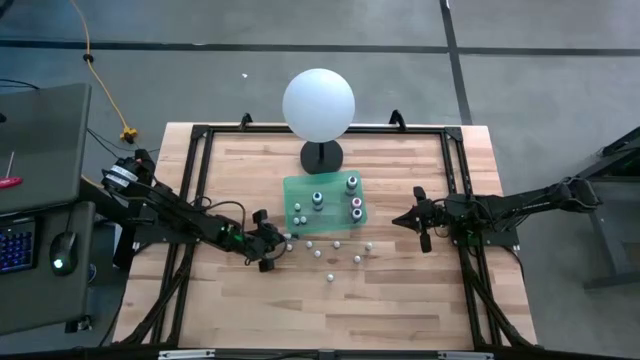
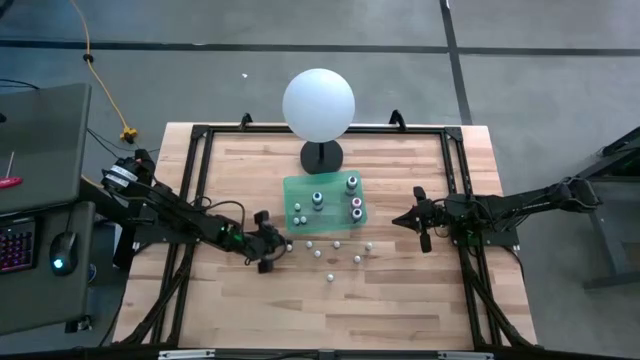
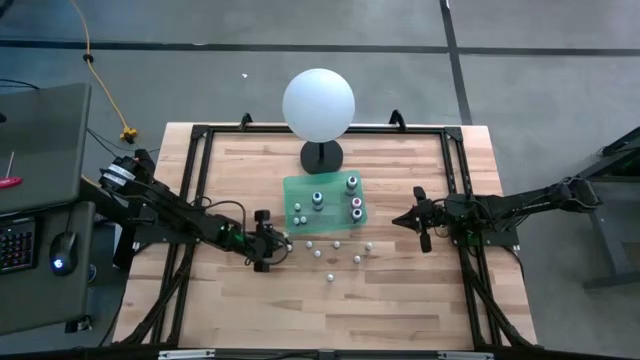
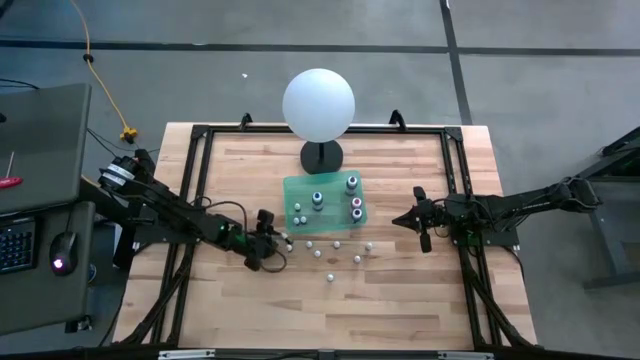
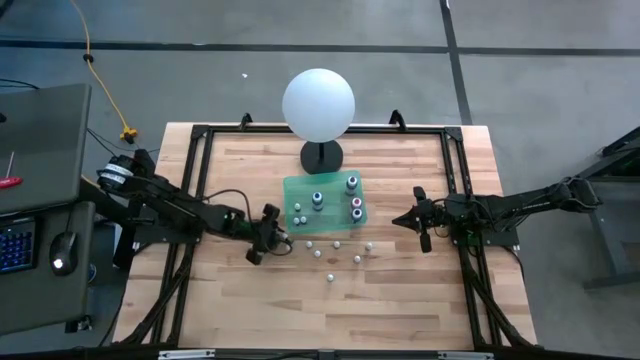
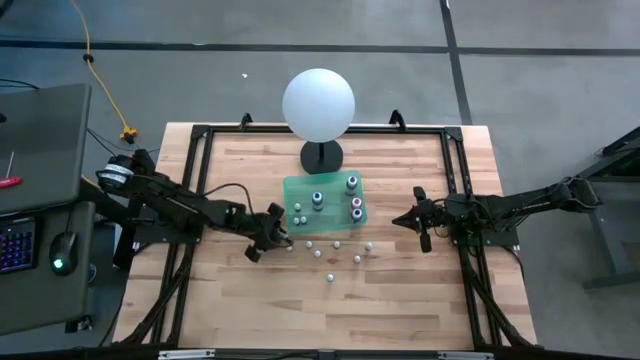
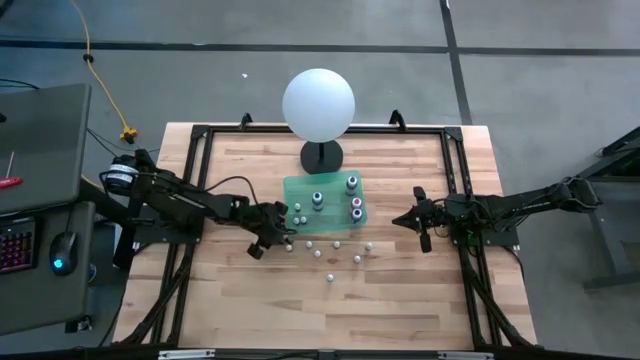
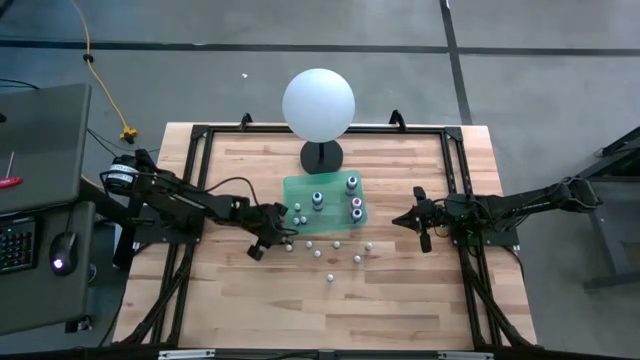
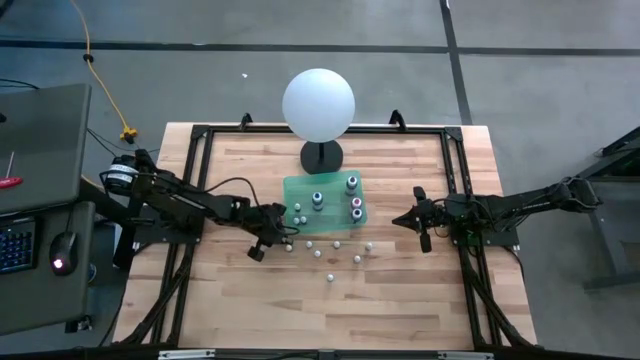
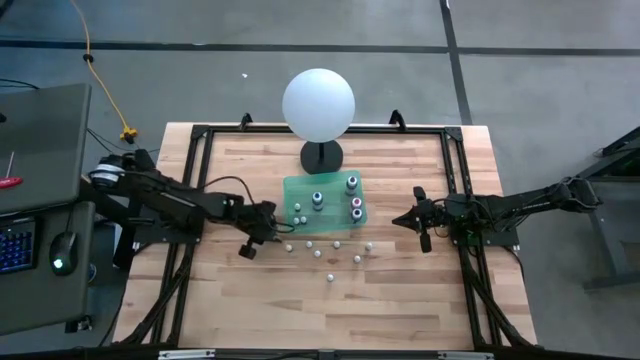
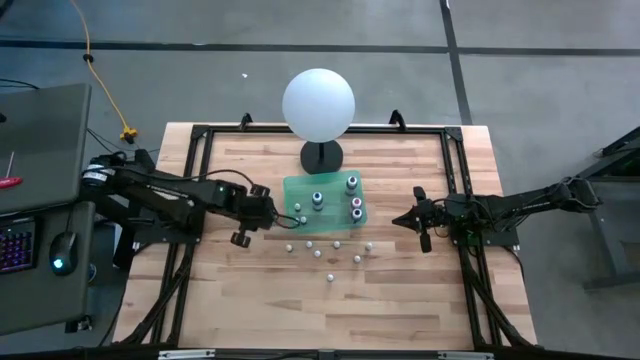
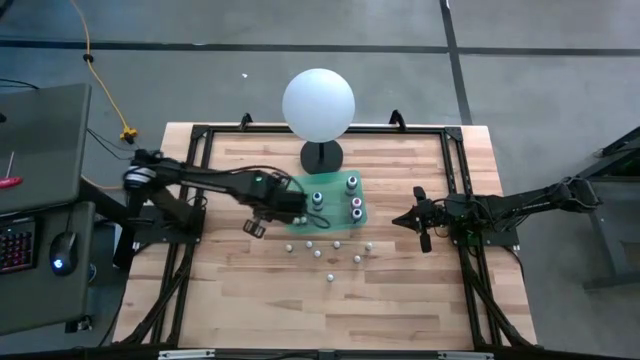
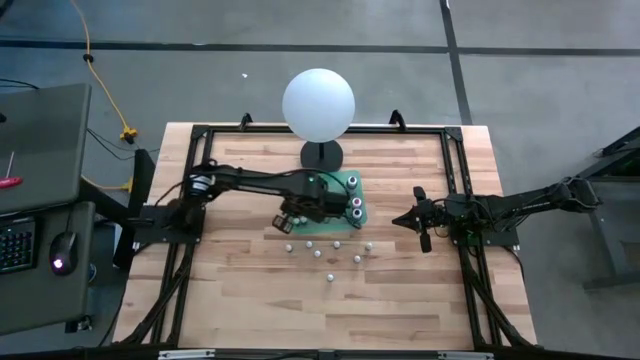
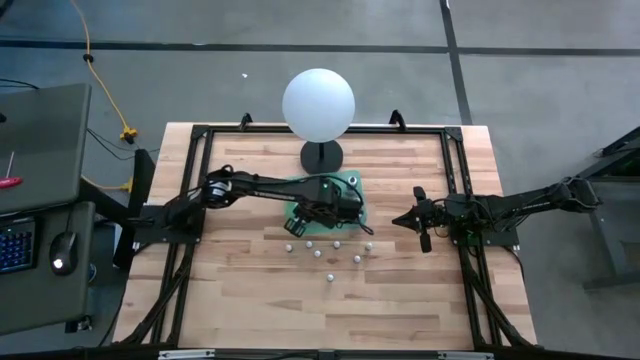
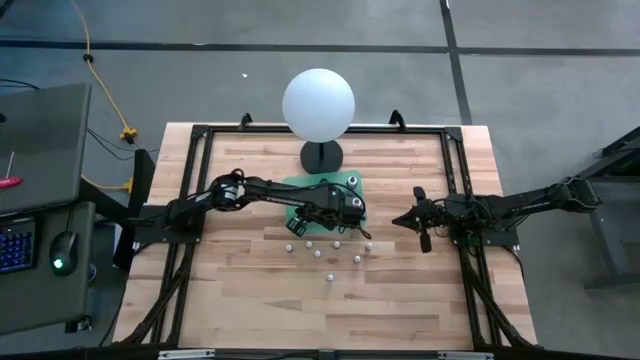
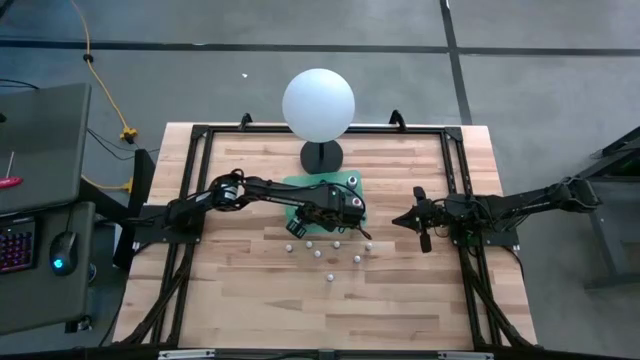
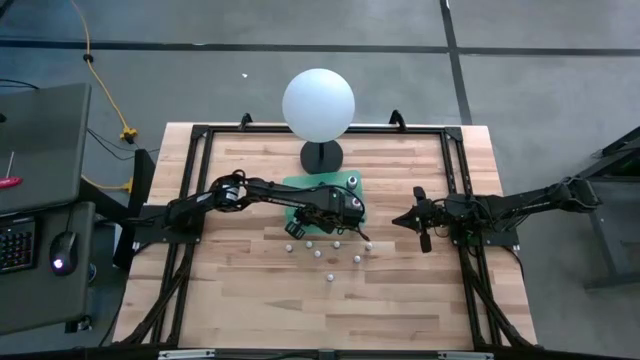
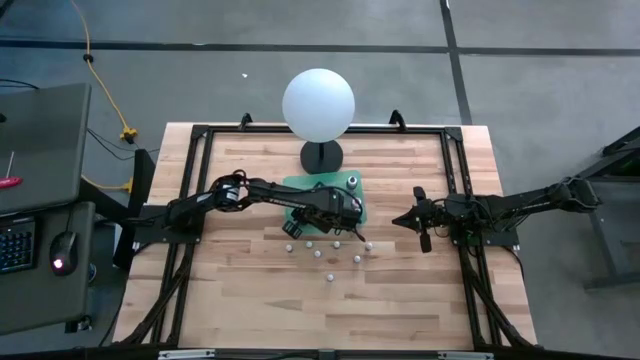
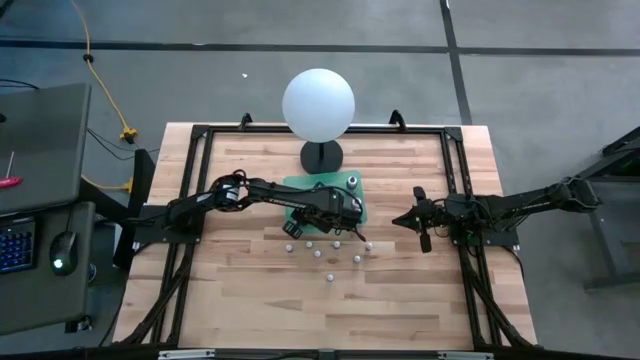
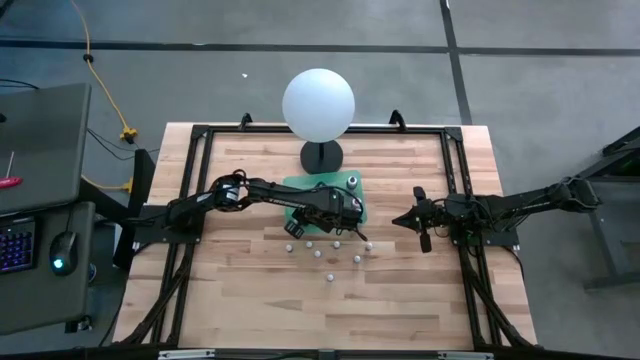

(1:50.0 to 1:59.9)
Task: Pick & Place food coloring
Put the small green food coloring bottle into the bin

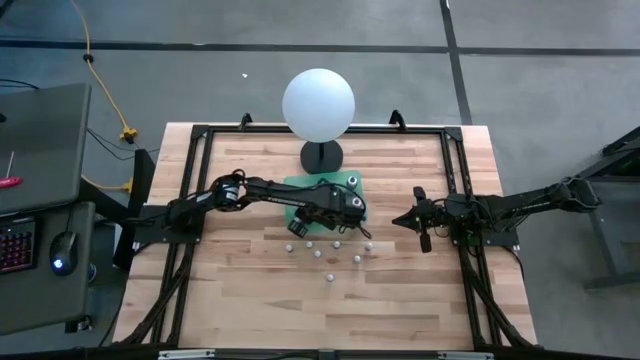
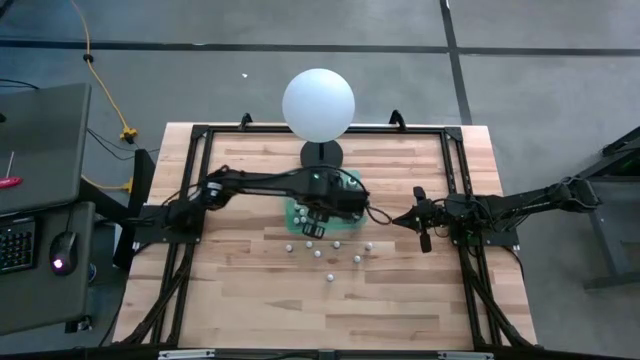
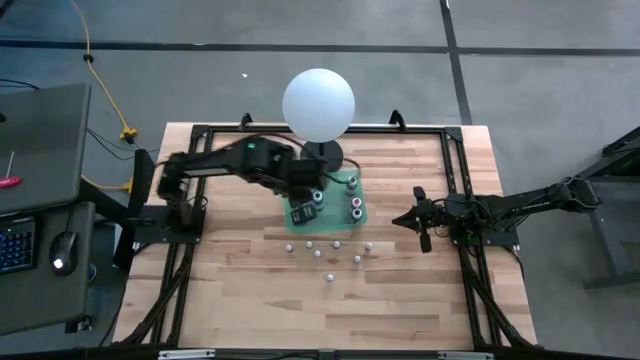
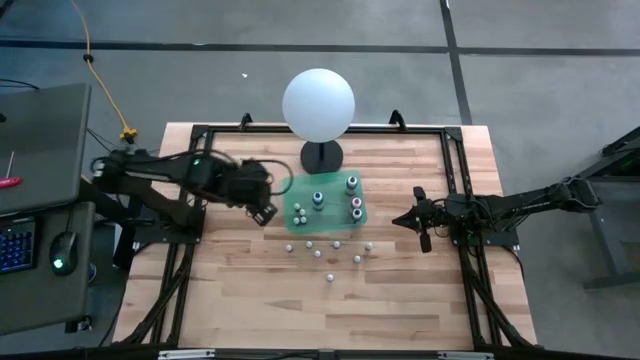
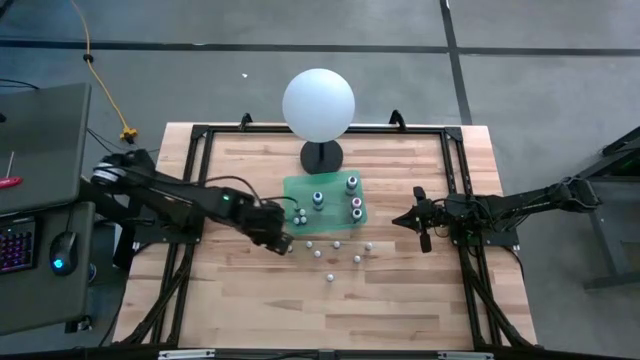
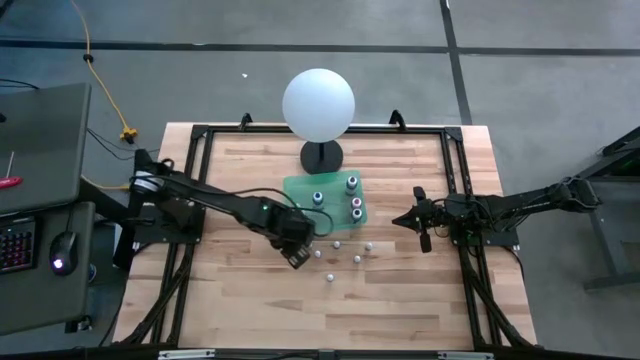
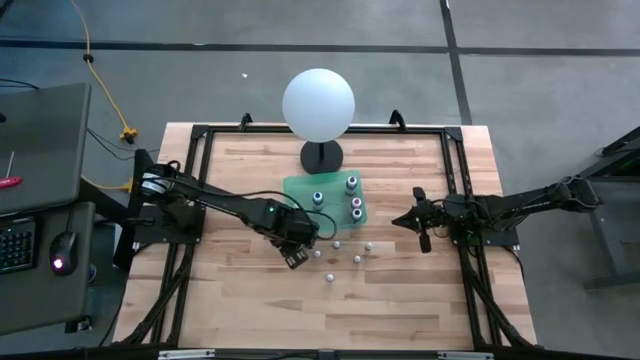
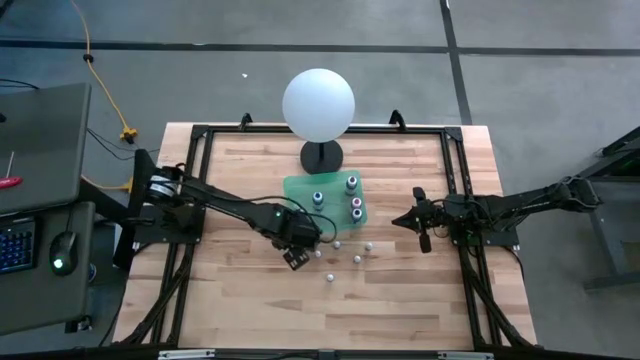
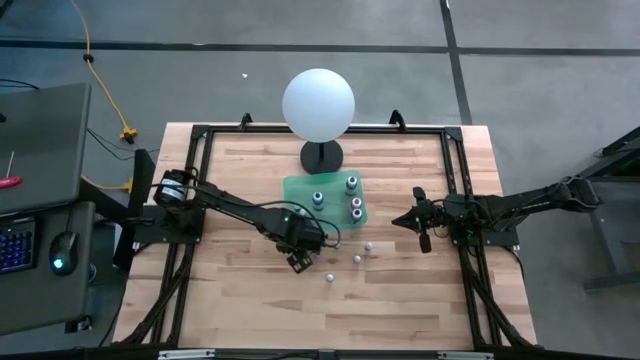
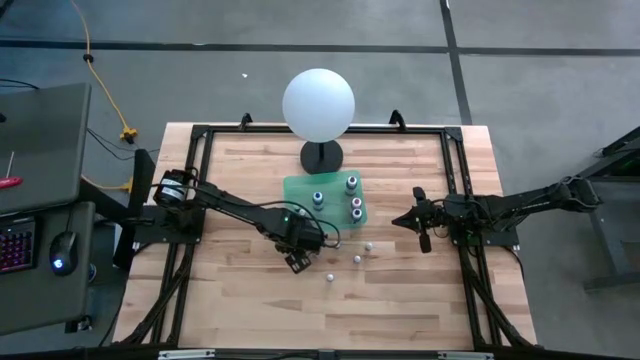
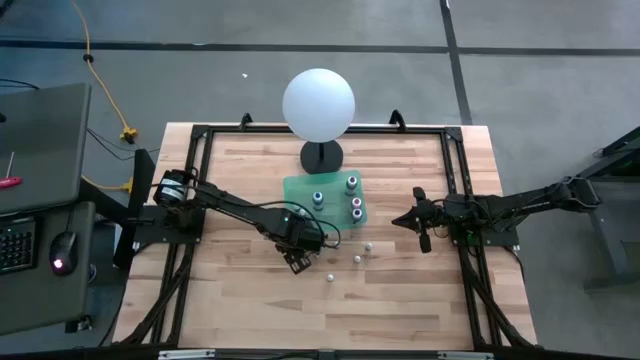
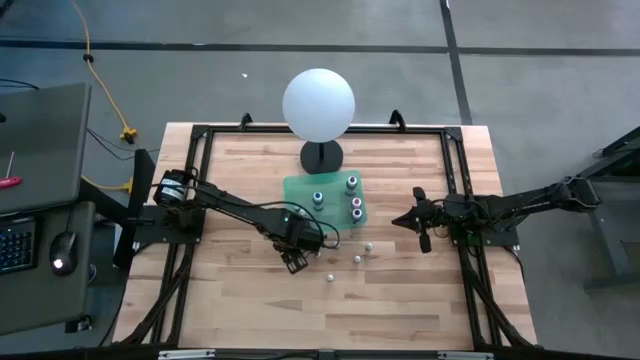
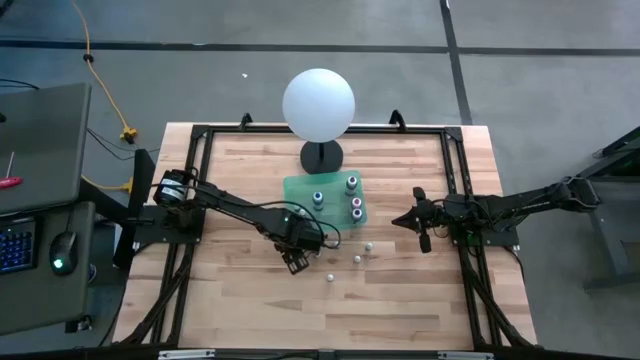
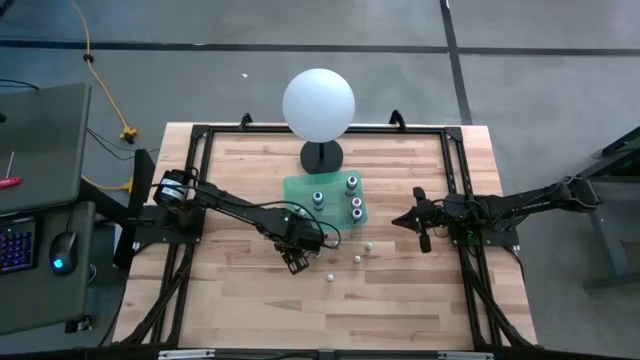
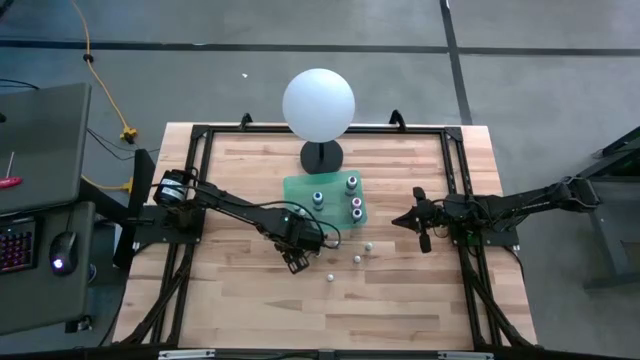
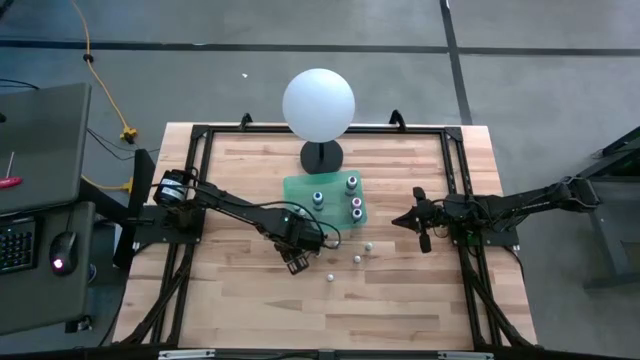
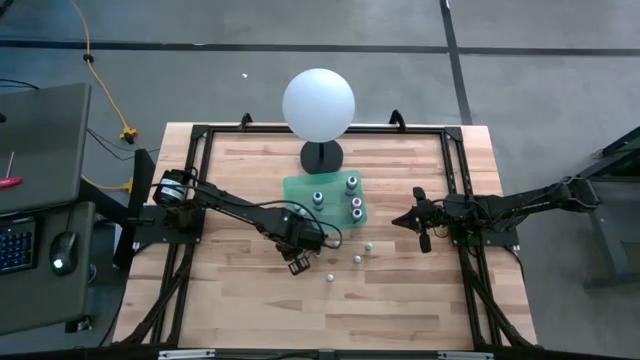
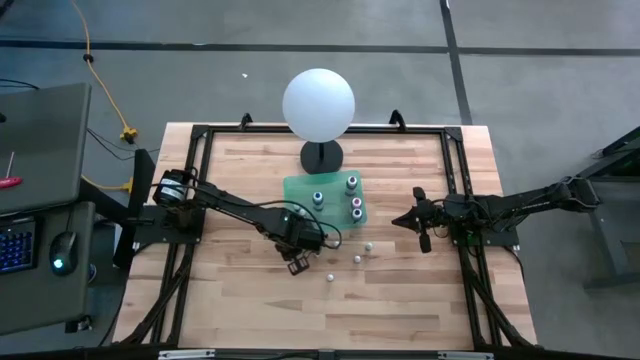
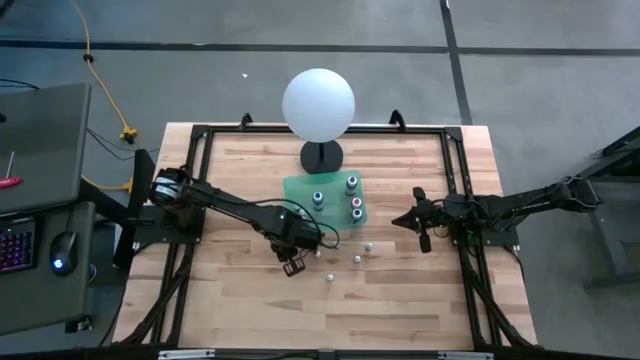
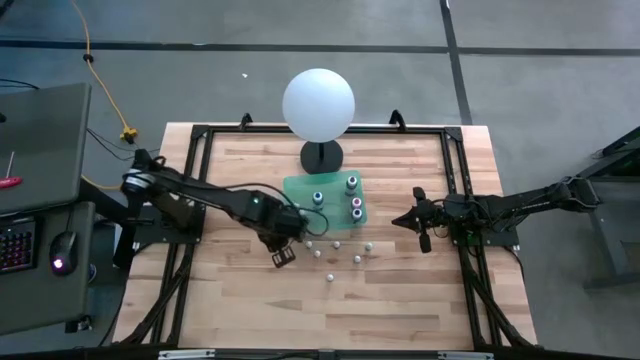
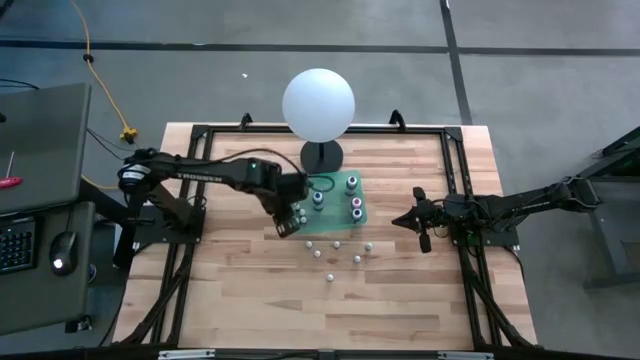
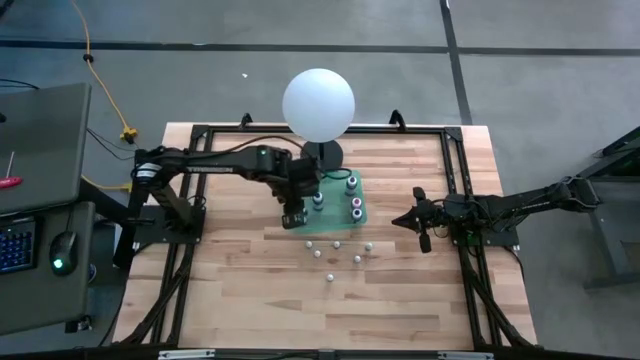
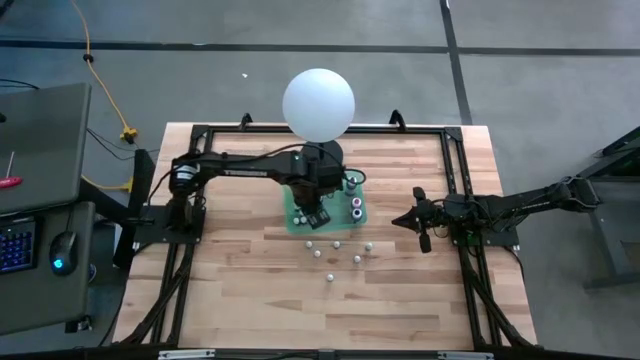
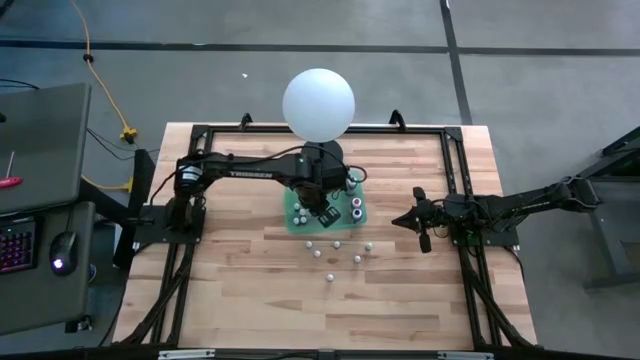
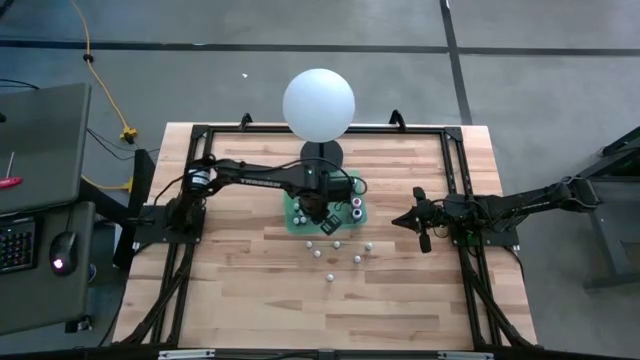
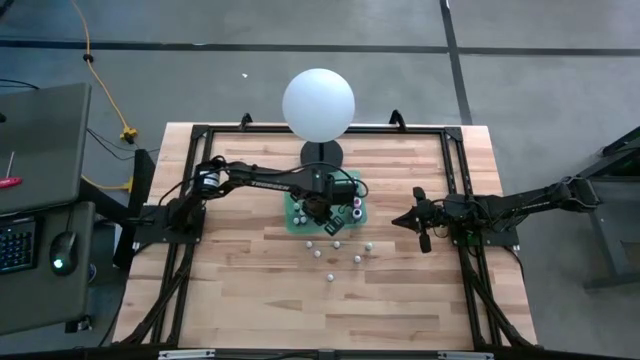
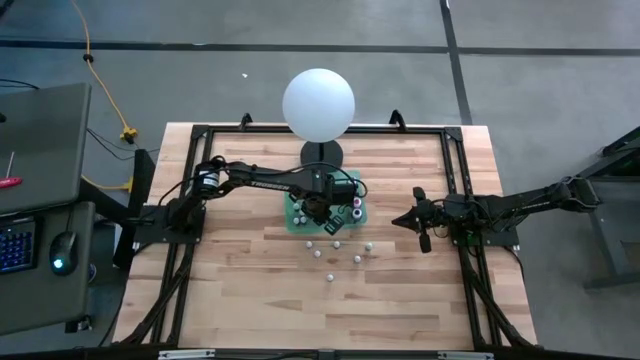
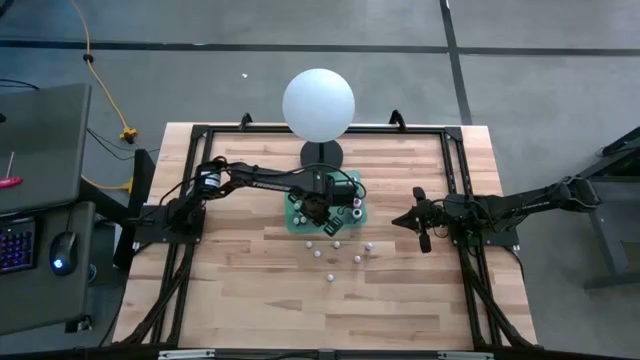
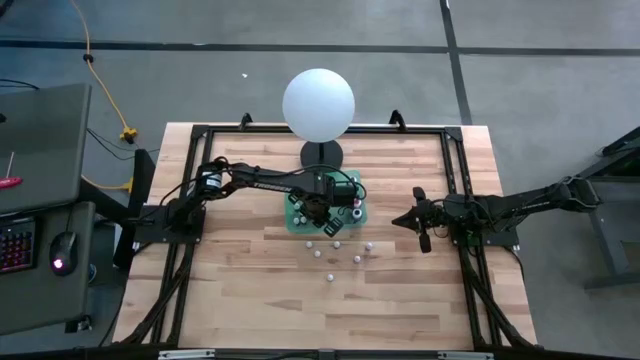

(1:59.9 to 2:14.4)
Put the top small purple food coloring bottle into the bin
